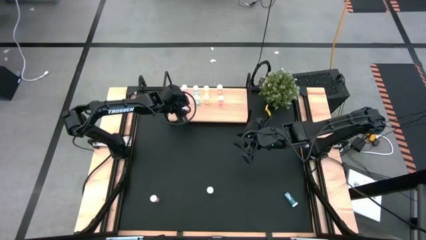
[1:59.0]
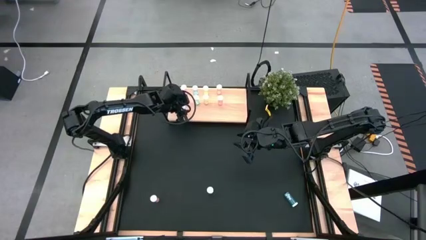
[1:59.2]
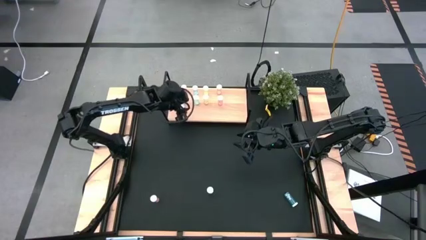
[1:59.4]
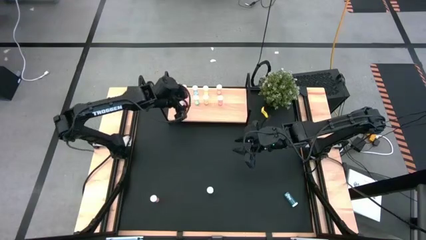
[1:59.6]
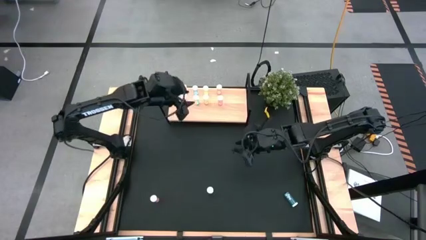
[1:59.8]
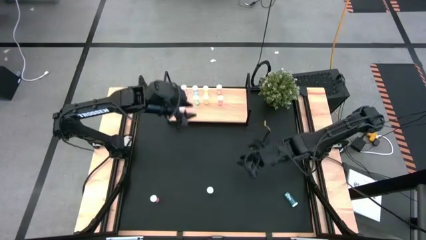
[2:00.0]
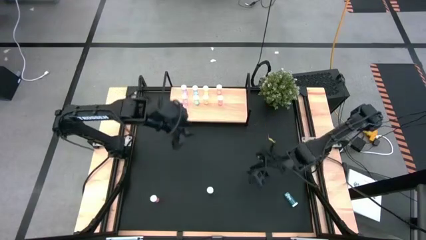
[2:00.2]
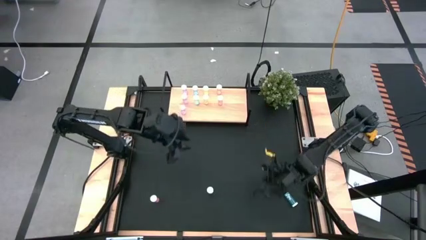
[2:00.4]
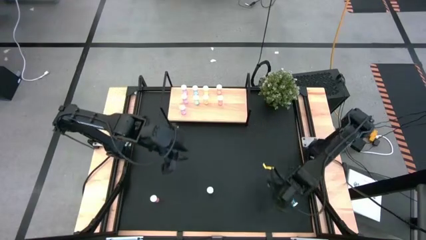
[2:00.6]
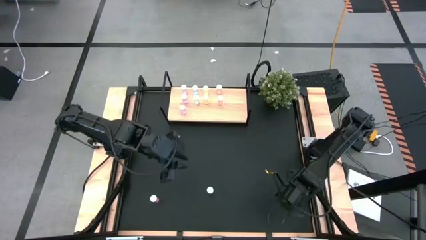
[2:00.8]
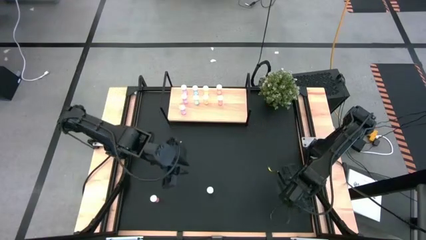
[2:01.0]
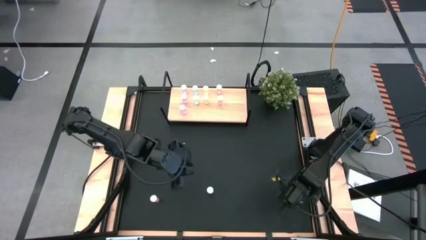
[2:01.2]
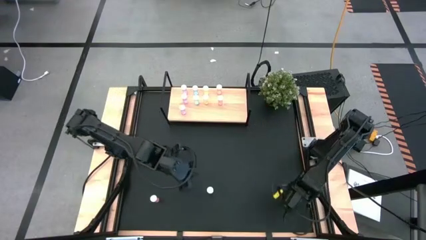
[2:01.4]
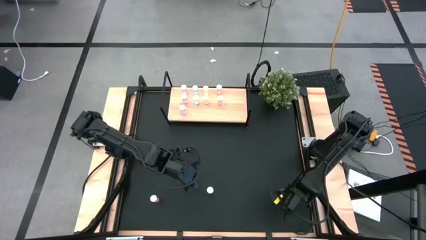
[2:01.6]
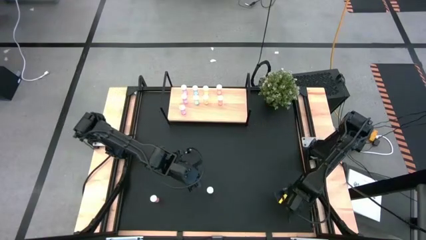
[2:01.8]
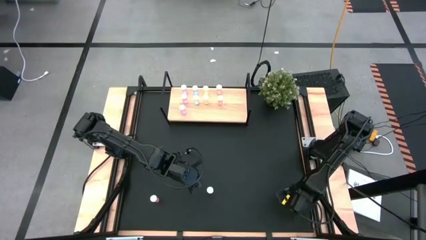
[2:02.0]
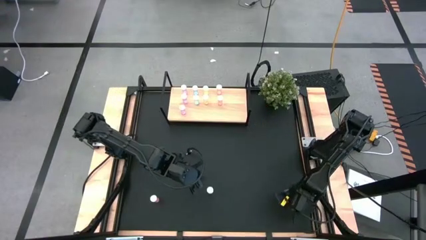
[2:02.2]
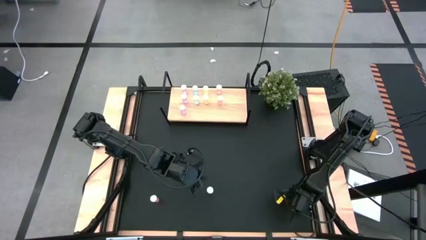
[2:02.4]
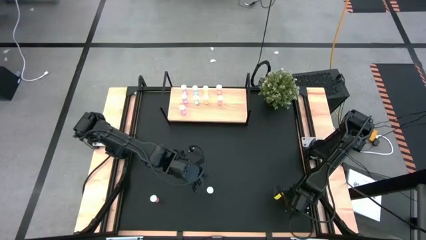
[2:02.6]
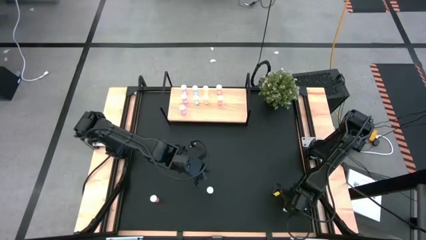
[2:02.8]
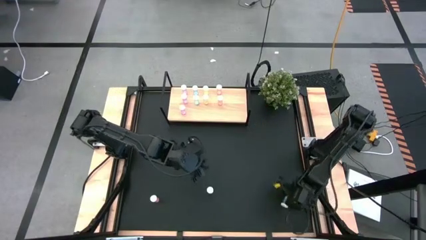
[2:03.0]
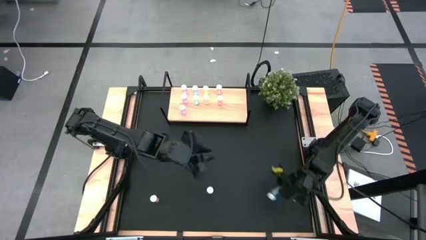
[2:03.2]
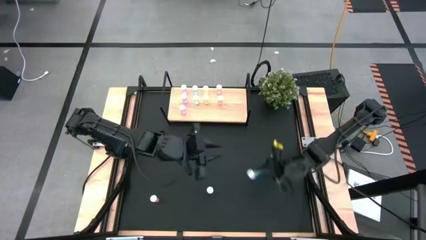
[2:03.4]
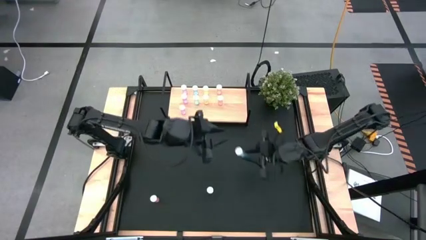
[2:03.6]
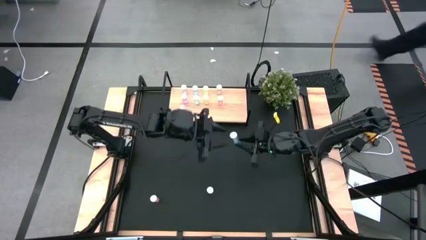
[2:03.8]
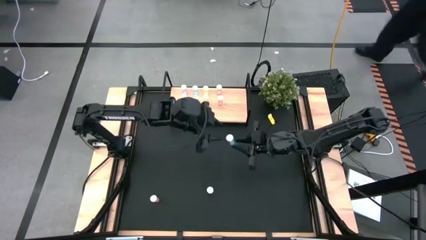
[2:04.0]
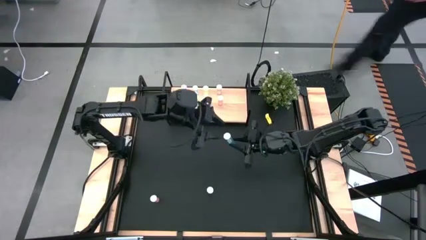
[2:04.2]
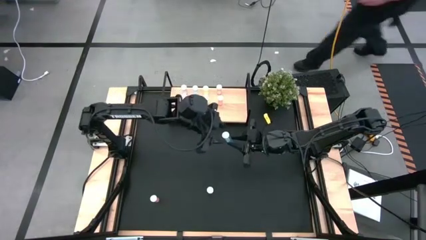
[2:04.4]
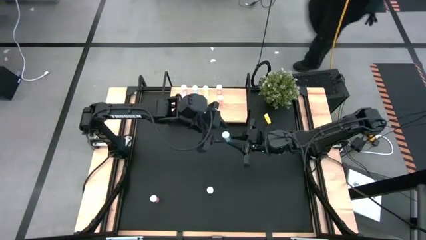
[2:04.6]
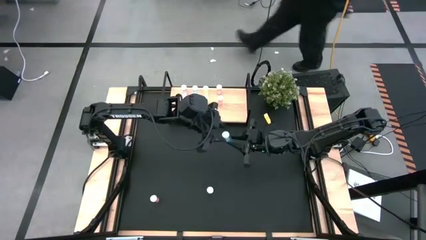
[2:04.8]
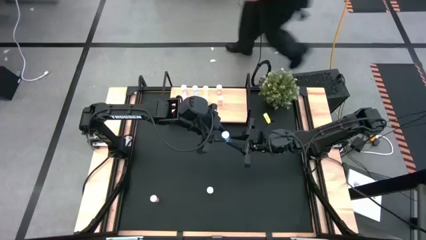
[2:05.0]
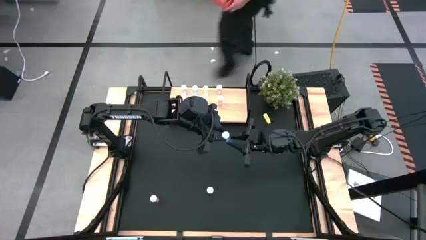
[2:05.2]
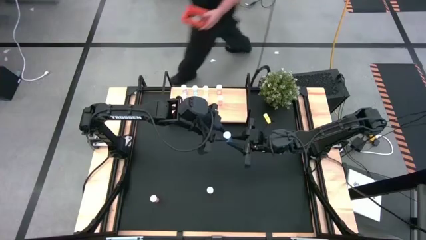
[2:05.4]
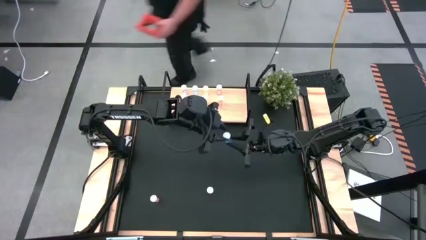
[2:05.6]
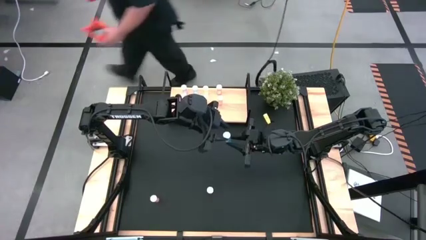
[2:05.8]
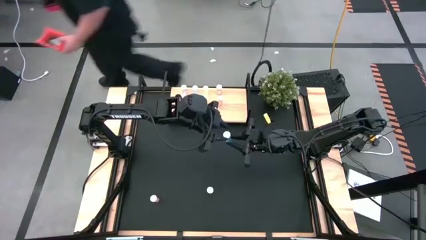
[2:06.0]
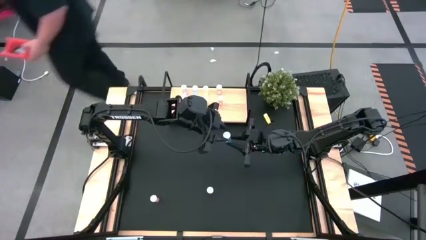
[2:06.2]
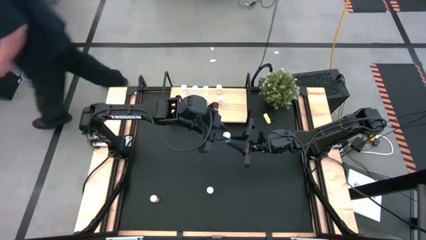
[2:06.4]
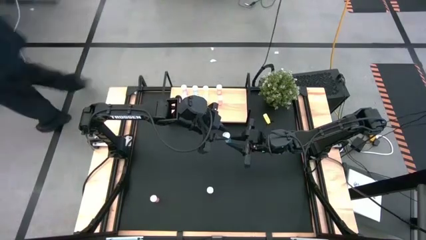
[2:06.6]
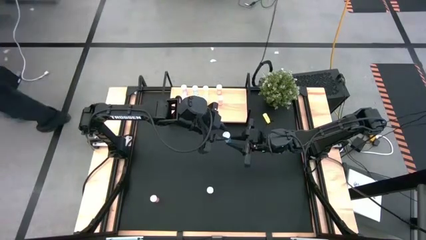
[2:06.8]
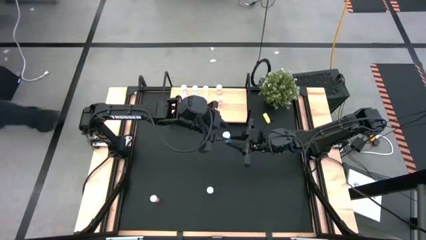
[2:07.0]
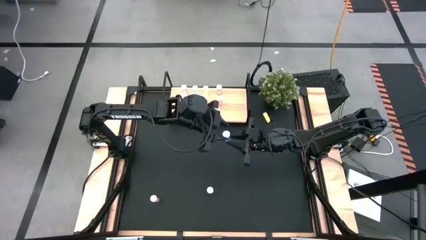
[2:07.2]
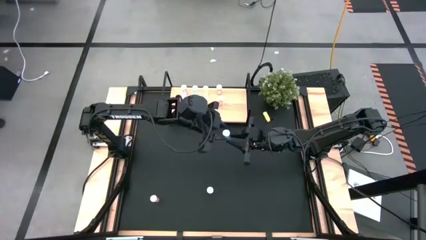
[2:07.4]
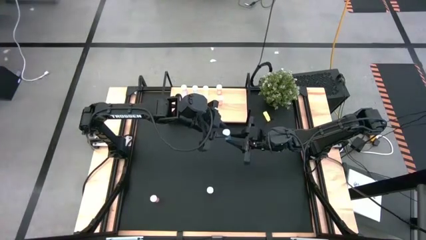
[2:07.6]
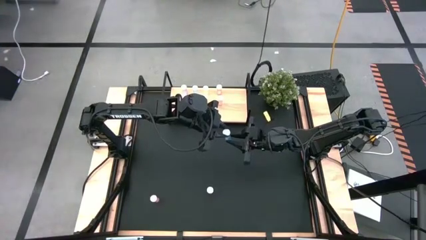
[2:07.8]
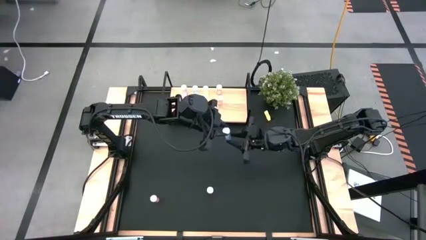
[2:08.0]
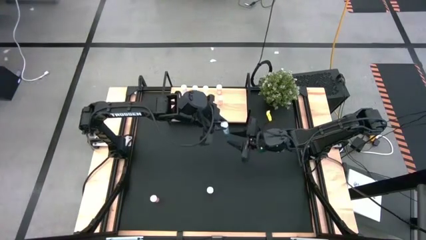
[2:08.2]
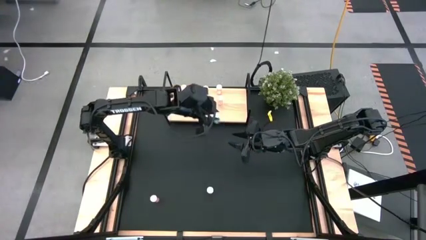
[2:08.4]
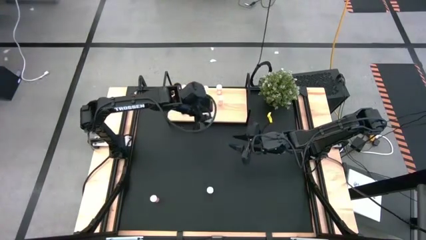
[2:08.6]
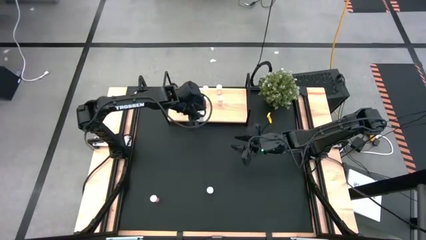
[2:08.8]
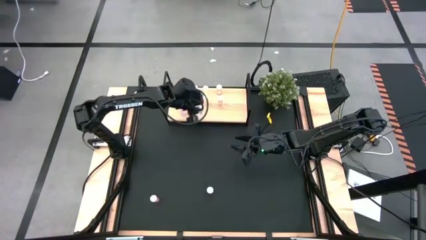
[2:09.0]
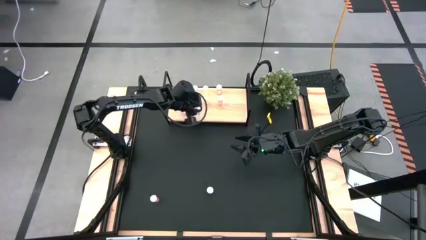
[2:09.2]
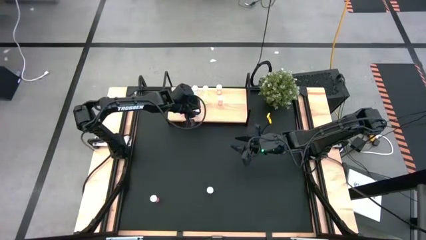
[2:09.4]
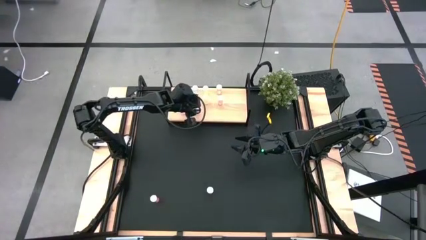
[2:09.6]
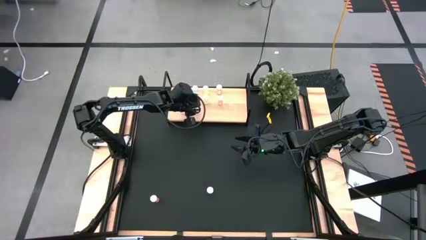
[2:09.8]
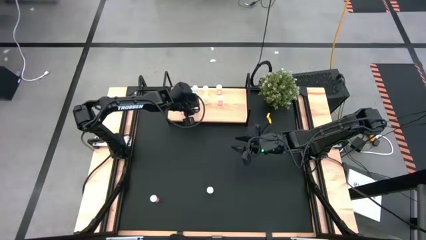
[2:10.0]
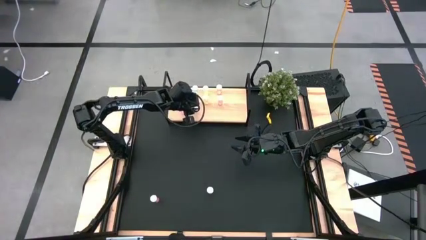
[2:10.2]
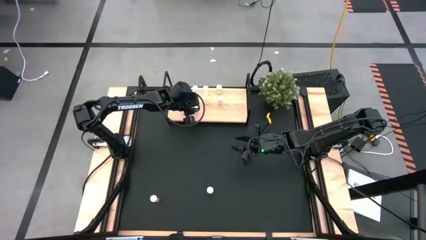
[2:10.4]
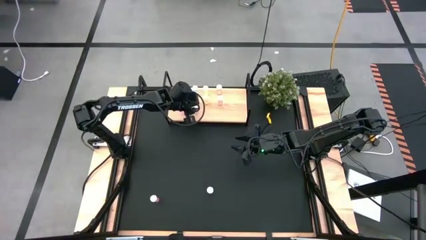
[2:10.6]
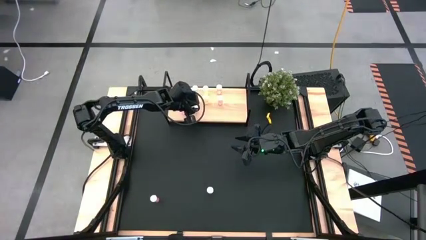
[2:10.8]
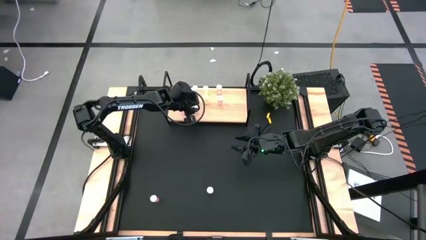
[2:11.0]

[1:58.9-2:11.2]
Task: Pick and place medicine bottles onto shelf by color
Put the blue medicine bottle on the shelf aligned with the other blue medicine bottle

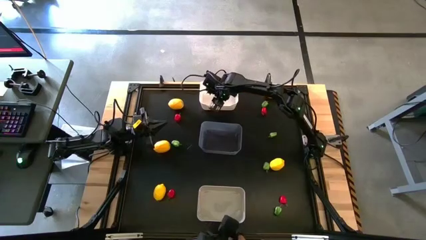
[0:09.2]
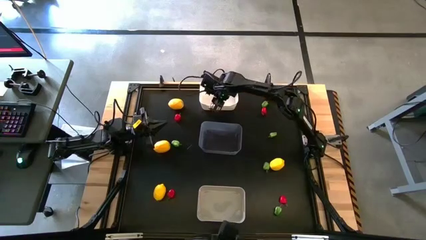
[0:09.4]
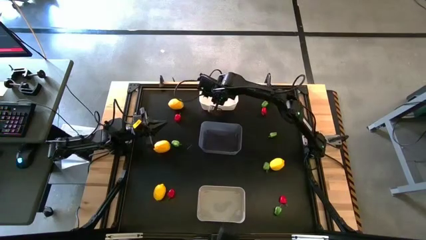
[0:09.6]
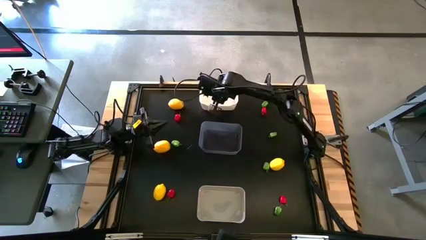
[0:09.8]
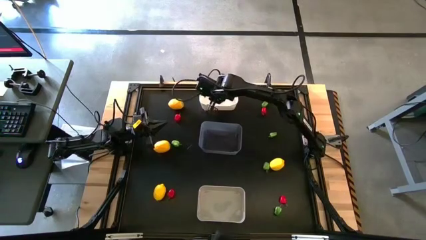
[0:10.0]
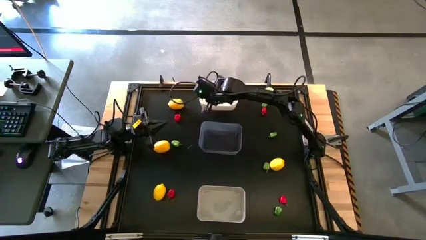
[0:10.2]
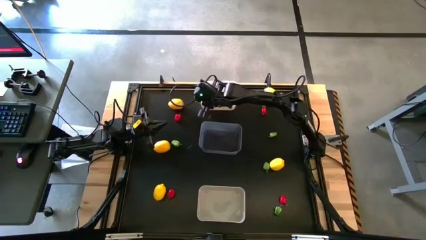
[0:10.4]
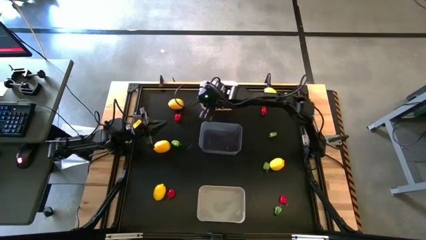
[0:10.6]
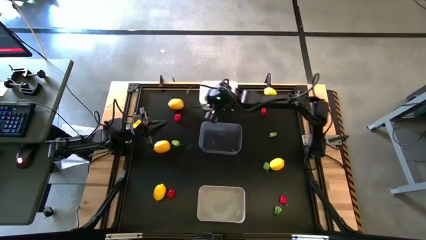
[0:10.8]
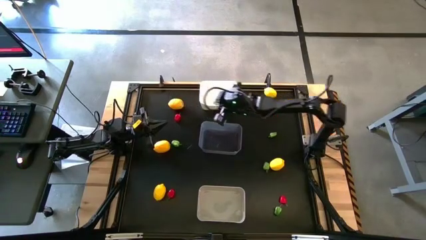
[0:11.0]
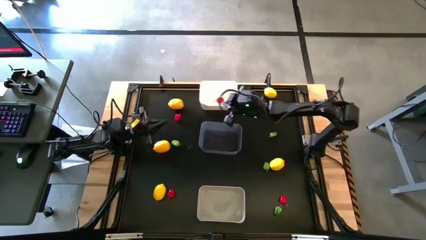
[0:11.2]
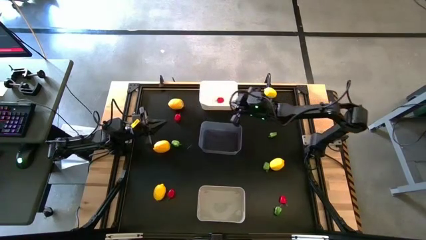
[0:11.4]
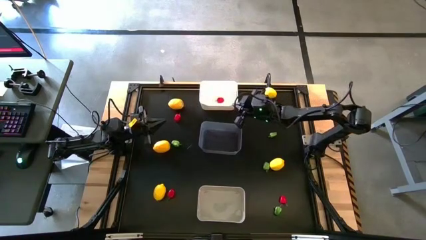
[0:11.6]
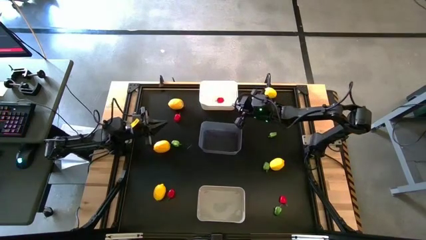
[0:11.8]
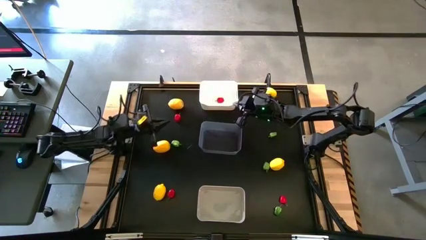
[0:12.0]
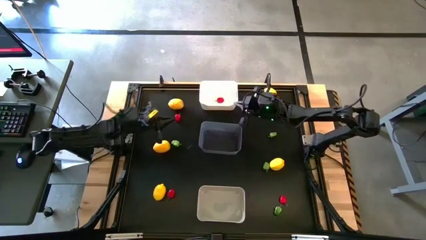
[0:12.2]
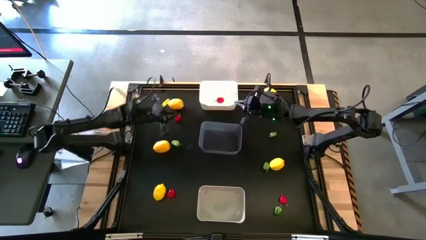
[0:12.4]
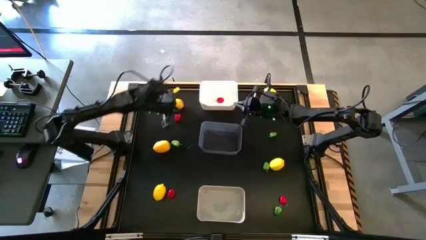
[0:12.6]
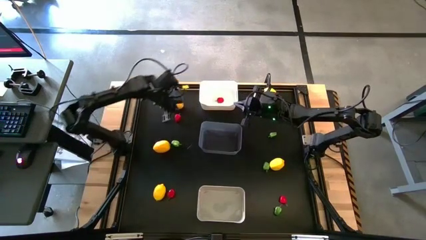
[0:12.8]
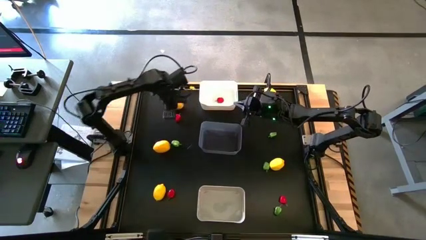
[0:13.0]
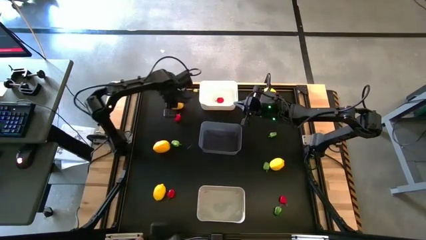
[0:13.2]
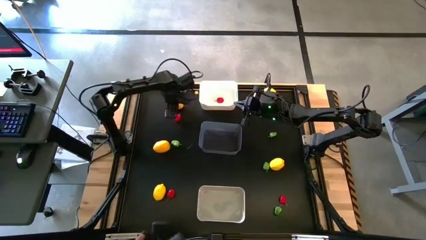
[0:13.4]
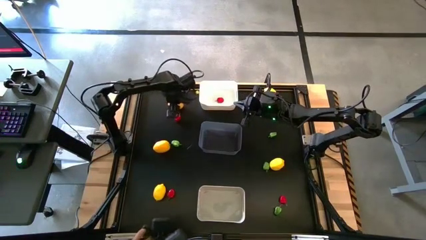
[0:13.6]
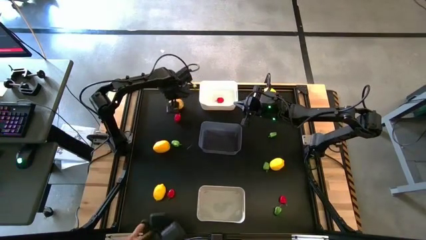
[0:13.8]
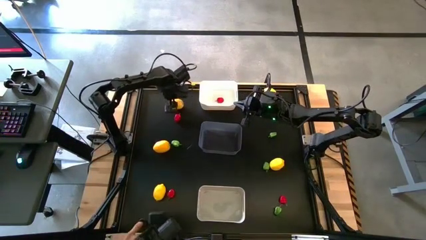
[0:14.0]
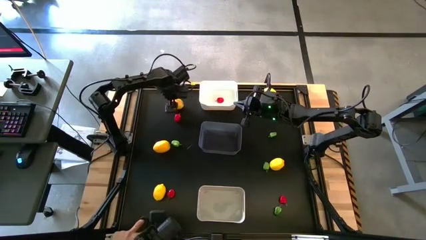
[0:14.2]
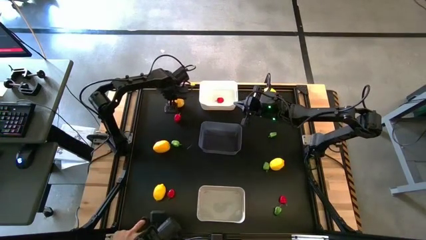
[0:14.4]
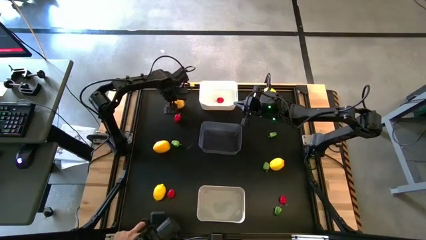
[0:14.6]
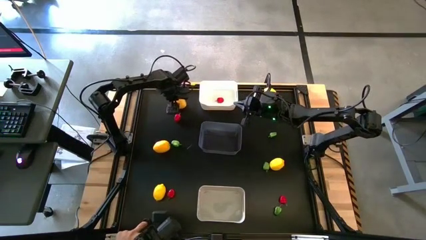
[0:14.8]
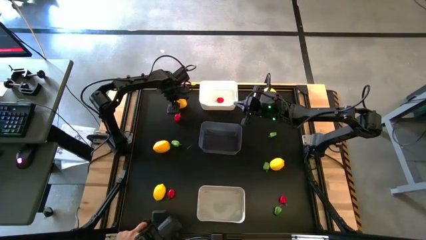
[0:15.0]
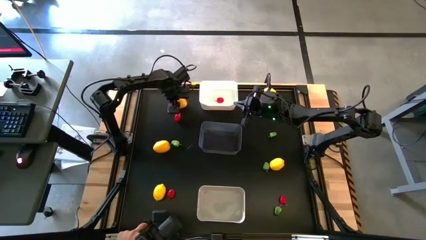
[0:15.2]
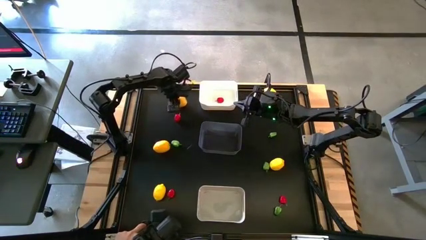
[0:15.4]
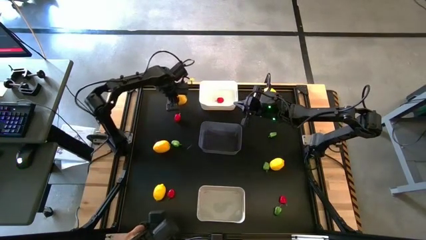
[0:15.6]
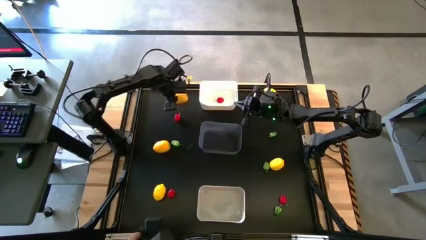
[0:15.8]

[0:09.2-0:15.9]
Task: Sort produce into baskets
Put the yellow lemon into the transparent bin
